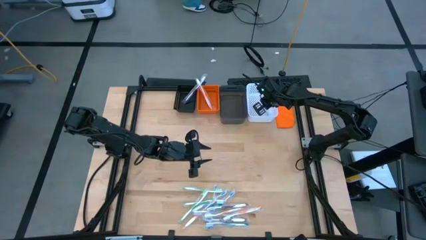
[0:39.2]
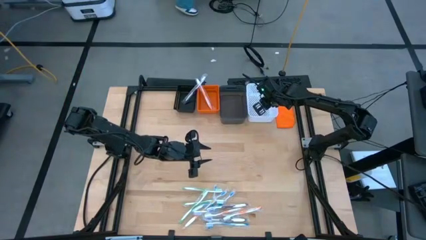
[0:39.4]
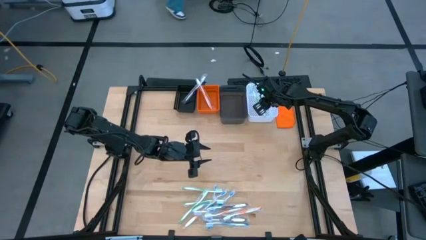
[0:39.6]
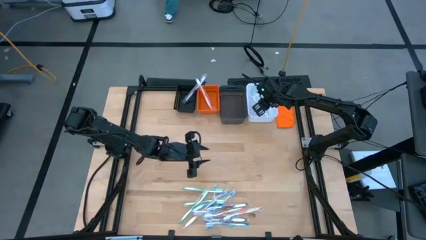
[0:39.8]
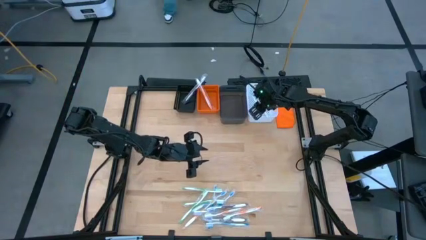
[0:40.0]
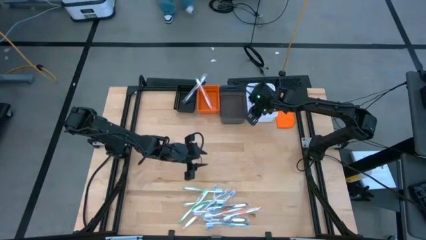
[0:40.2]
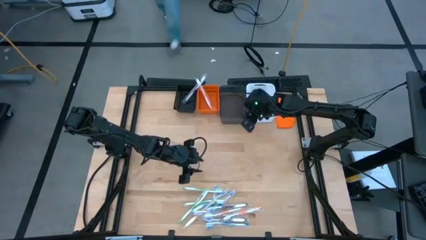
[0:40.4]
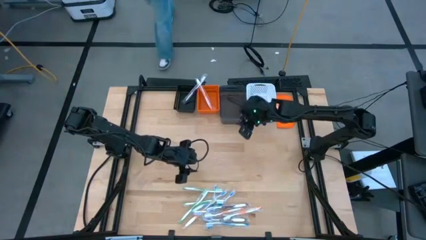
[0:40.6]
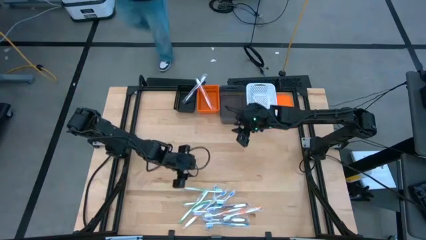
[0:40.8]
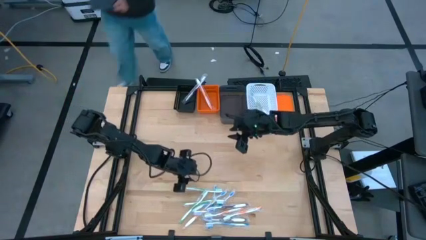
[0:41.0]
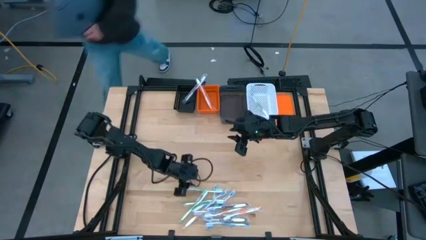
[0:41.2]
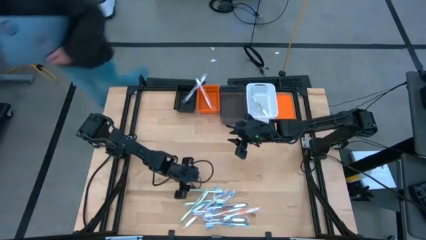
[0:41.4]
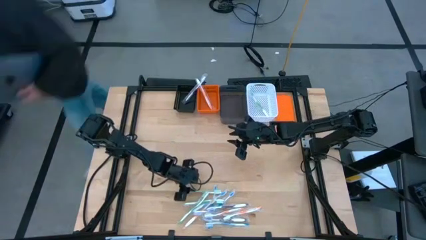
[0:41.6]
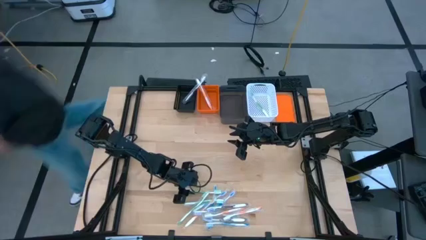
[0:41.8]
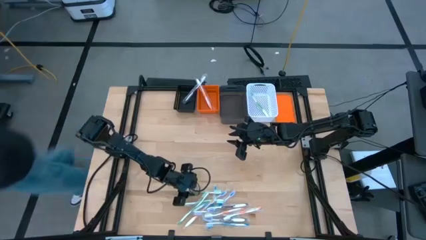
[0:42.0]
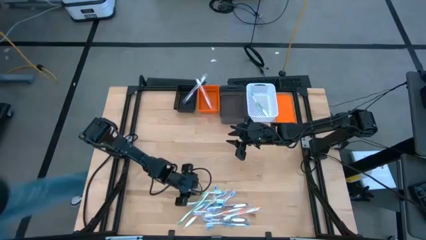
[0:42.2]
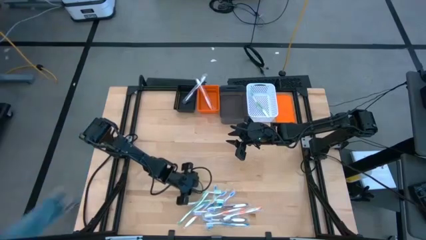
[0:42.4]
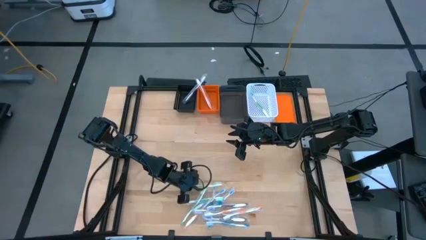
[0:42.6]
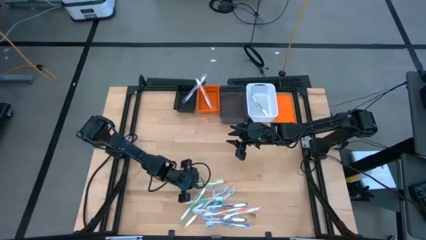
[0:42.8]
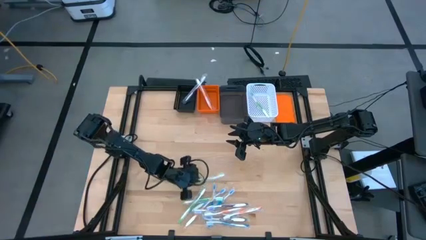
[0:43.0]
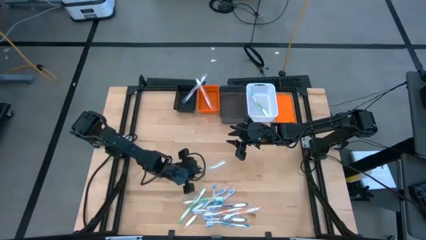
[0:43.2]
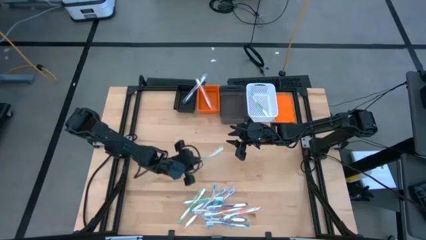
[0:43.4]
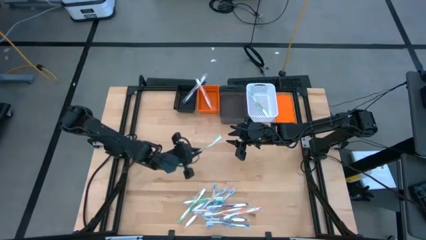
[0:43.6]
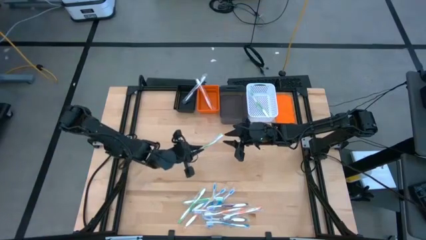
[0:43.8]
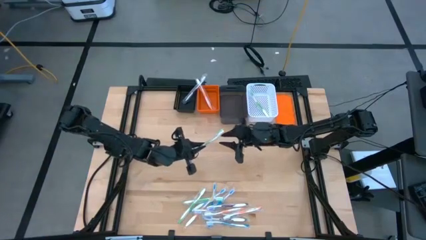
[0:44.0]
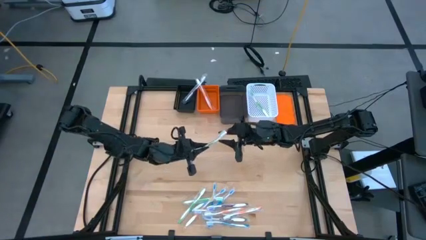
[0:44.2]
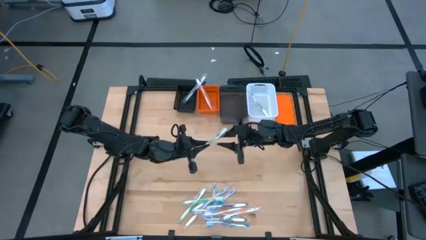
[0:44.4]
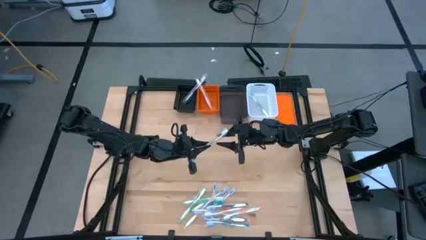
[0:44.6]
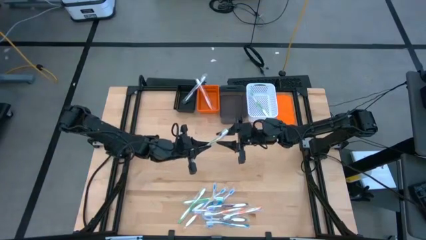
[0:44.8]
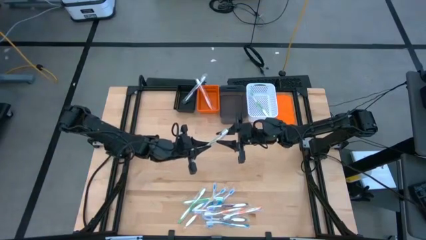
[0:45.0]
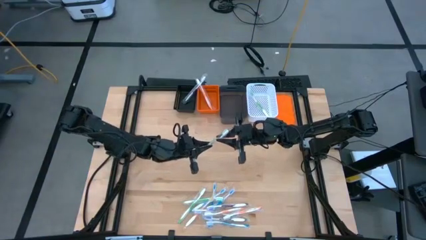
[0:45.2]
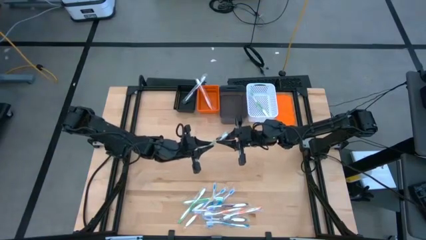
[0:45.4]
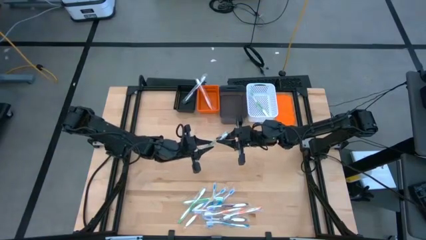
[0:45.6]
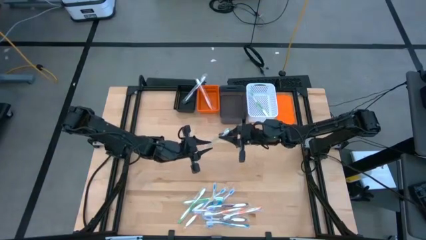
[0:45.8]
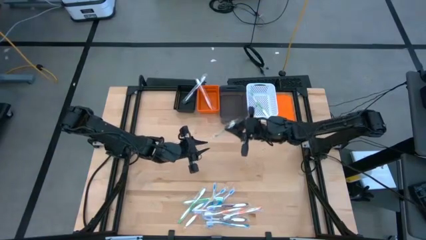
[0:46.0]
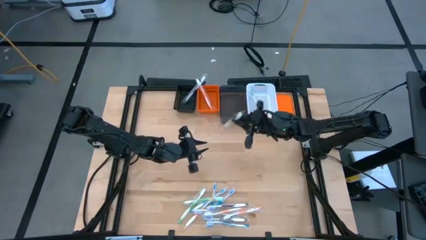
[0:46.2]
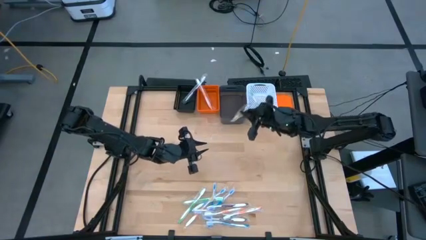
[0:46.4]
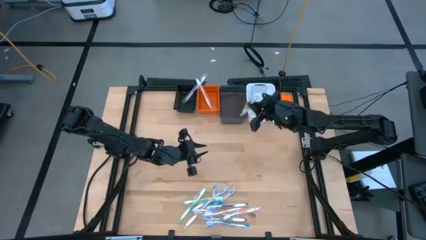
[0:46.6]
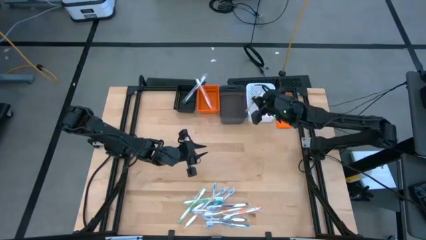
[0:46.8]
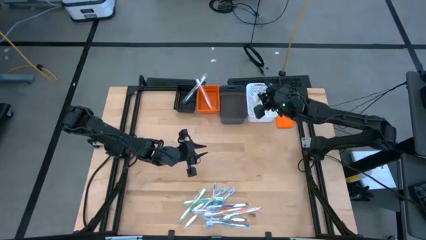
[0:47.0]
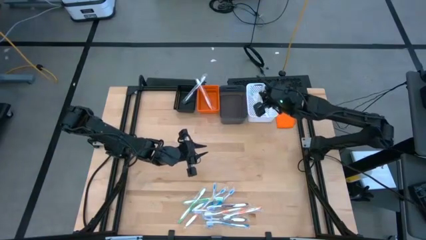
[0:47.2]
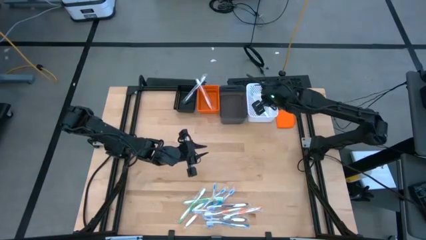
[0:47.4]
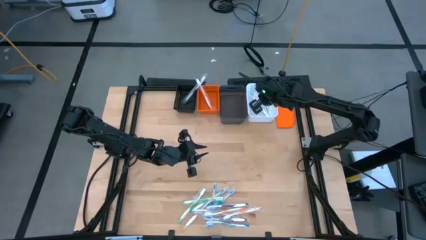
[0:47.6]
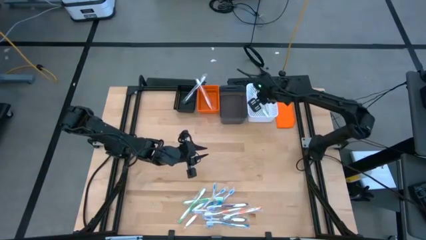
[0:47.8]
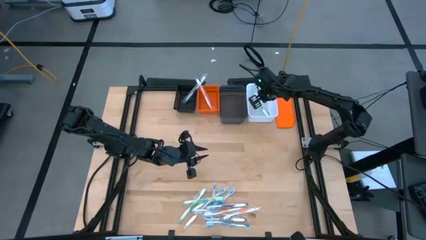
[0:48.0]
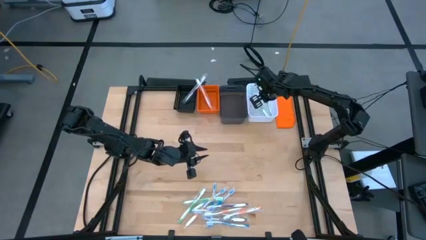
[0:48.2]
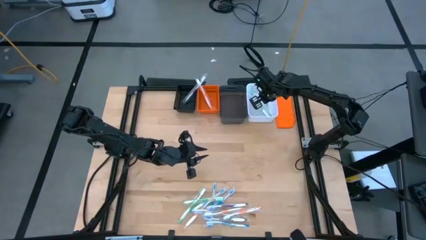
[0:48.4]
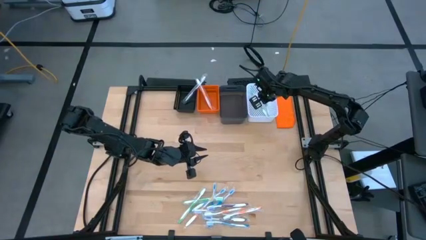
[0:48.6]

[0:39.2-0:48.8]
Task: Pick & Place Toothbrushes
Put the green toothbrush into the white bin

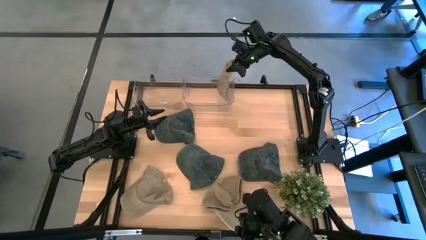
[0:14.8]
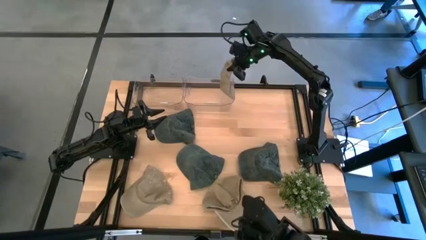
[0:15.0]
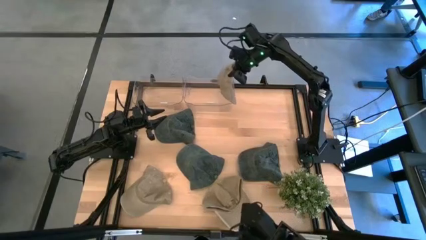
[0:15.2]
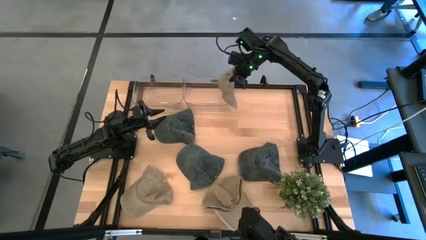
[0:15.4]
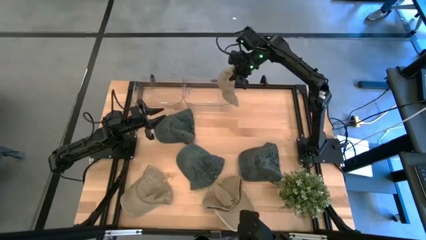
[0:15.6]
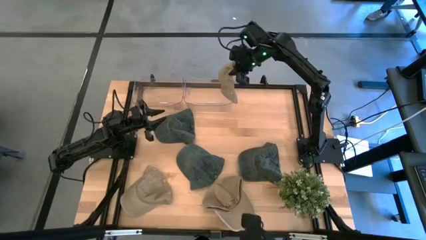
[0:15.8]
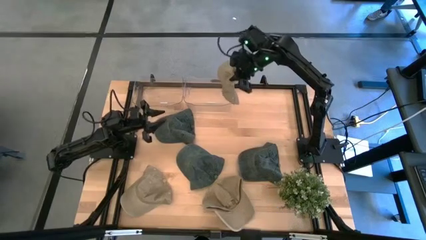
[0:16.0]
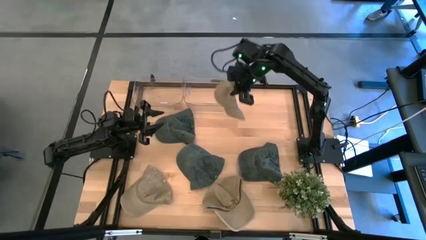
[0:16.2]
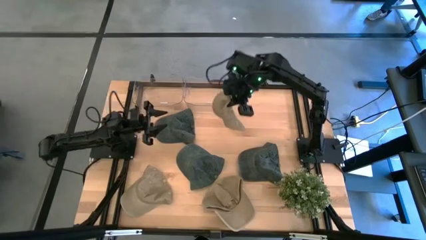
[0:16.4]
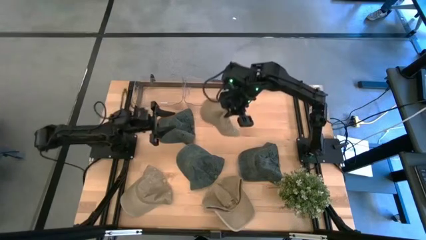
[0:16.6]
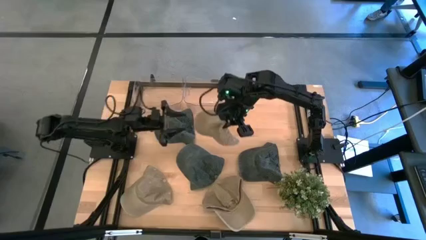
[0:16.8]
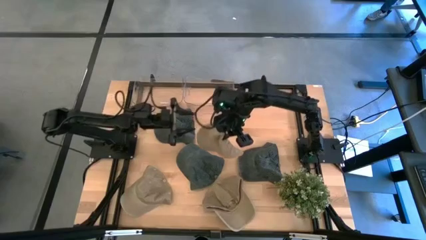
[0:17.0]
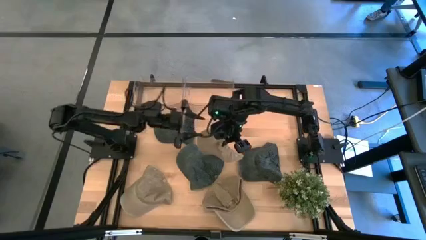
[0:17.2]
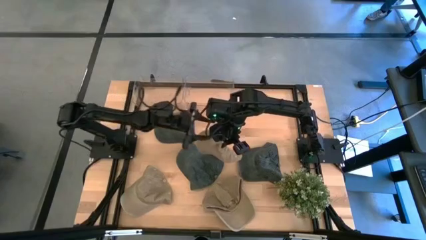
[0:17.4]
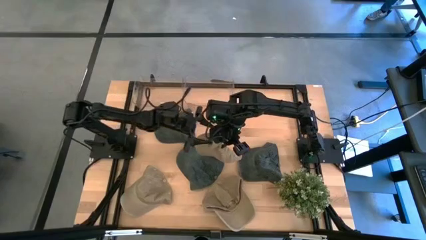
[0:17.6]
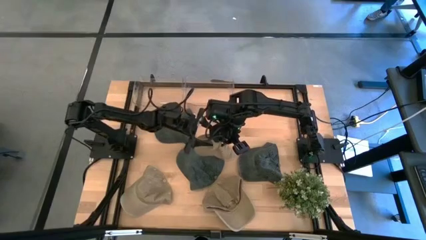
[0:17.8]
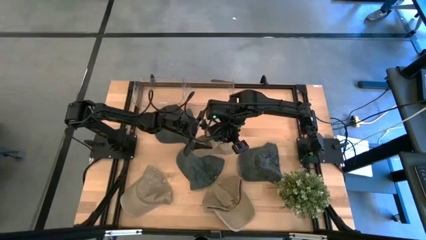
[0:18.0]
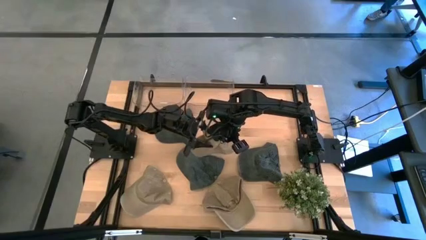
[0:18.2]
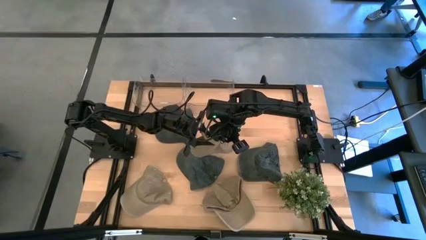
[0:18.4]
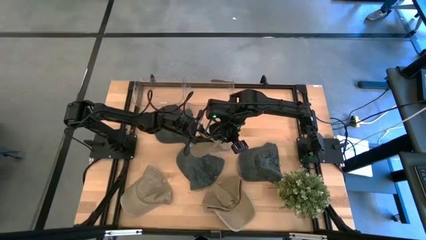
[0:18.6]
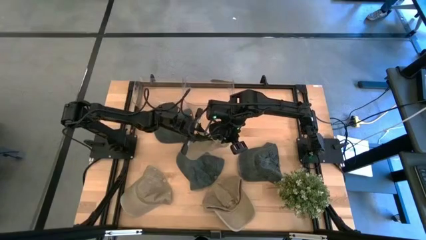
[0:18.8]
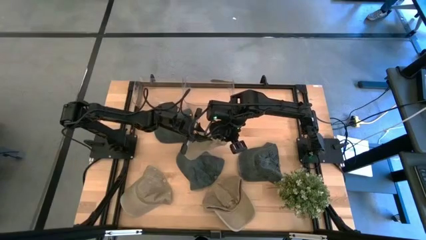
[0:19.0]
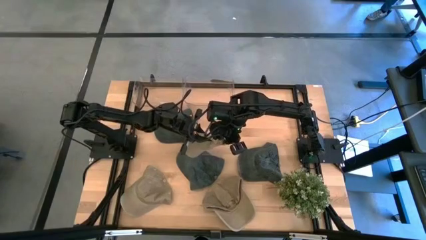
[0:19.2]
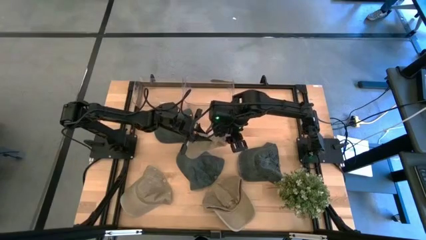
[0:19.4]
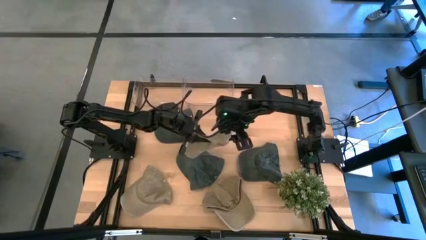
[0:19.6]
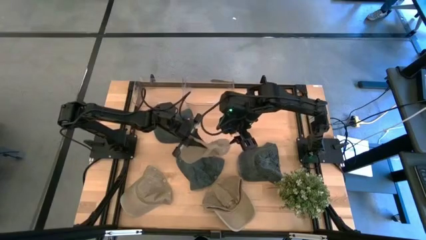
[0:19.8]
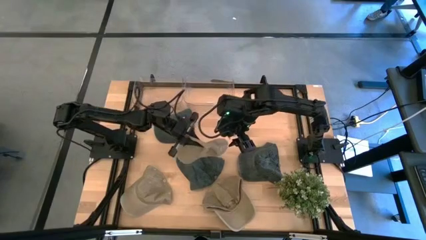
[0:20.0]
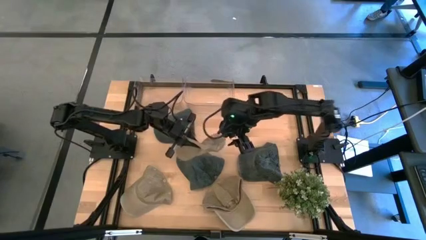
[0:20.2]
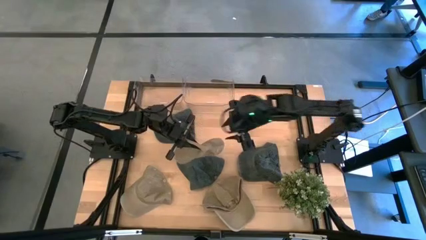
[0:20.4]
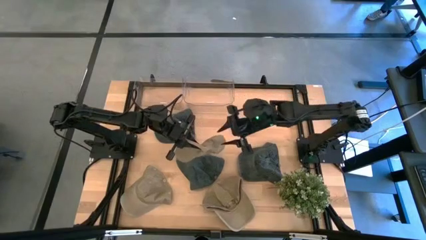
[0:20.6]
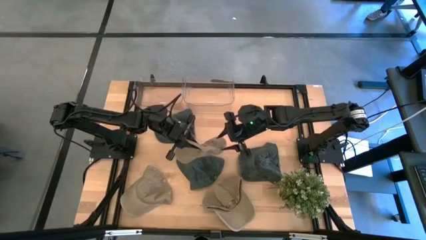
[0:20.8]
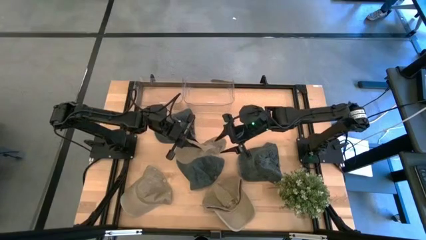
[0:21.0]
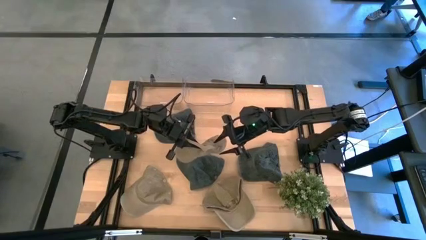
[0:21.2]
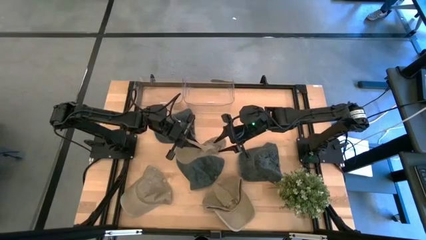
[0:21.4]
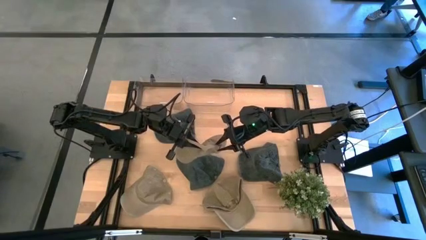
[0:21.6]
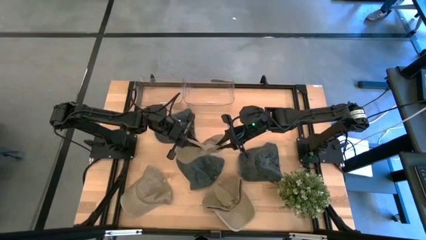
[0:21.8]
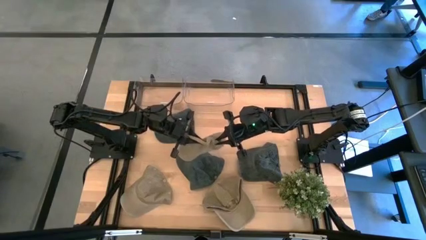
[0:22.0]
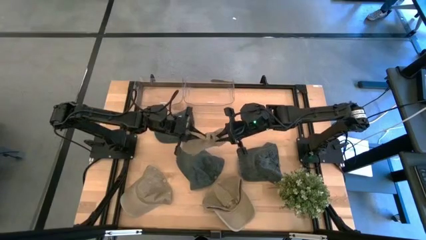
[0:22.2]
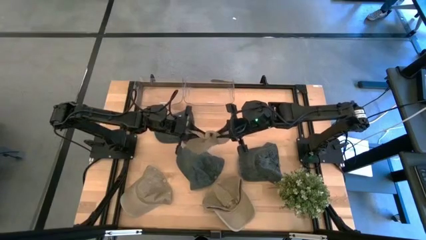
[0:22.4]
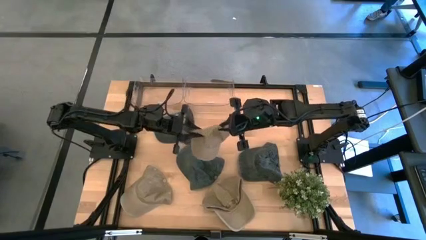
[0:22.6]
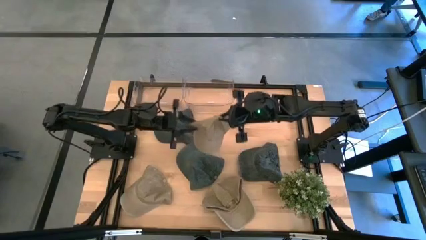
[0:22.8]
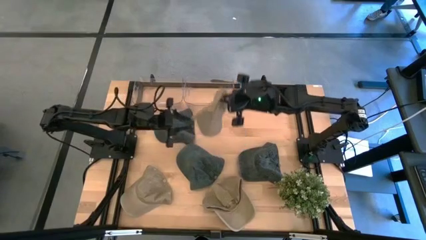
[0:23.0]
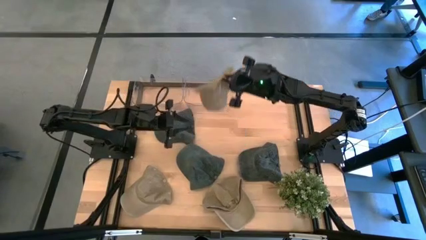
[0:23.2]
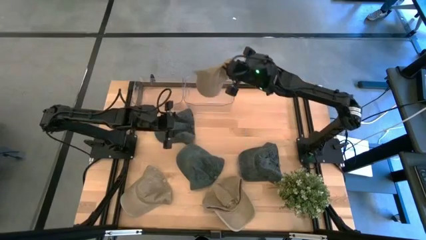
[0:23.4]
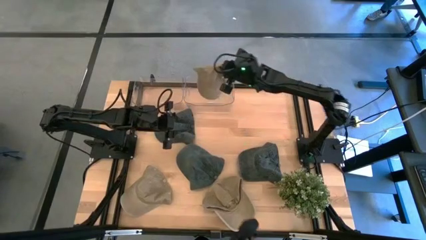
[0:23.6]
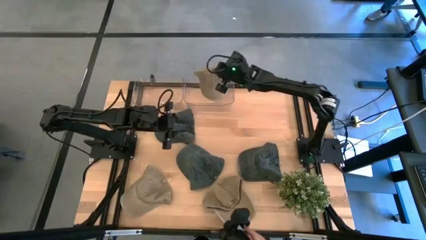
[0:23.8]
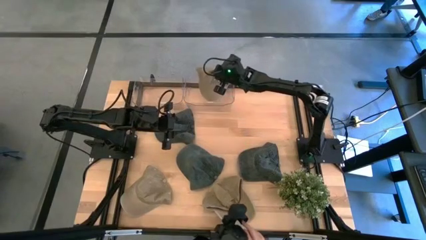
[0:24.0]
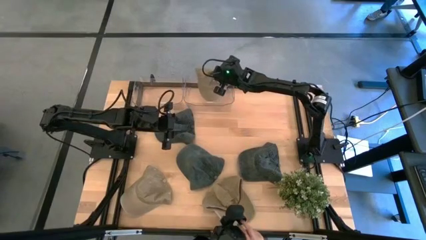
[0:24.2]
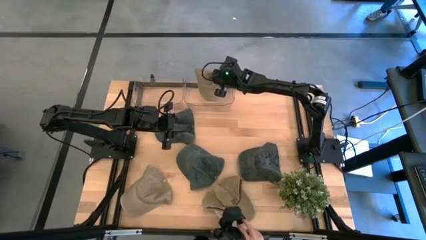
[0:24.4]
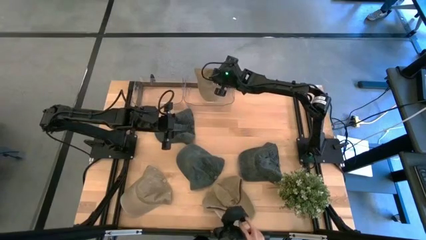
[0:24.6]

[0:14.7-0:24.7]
Task: Pick & Place hat
Put the top brown cap into the right transparent bin
